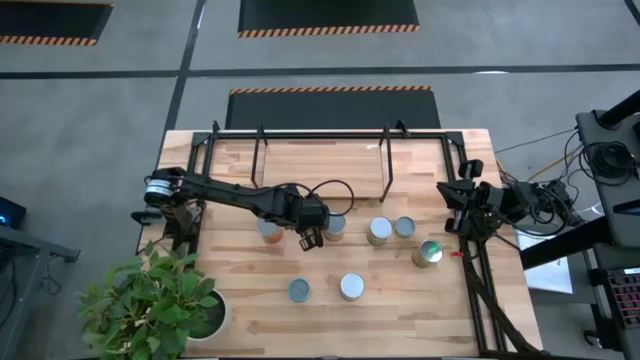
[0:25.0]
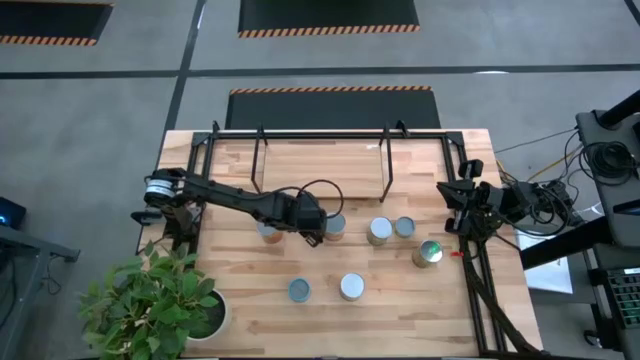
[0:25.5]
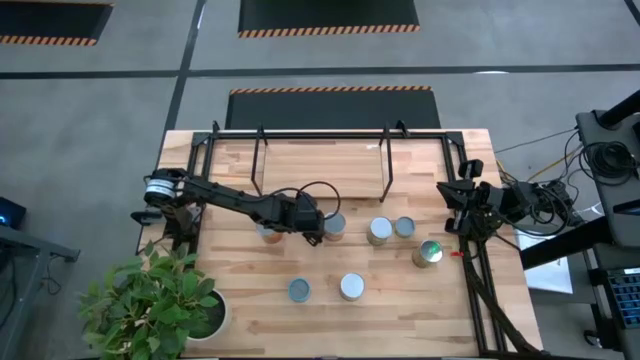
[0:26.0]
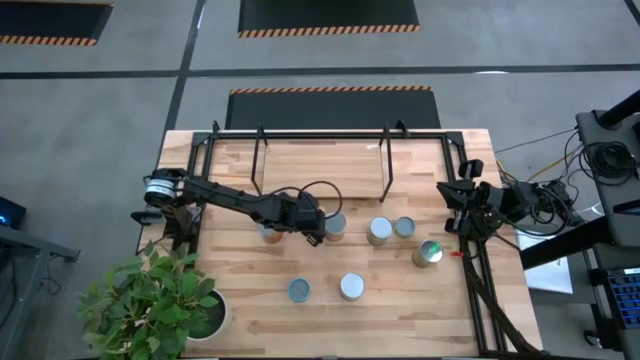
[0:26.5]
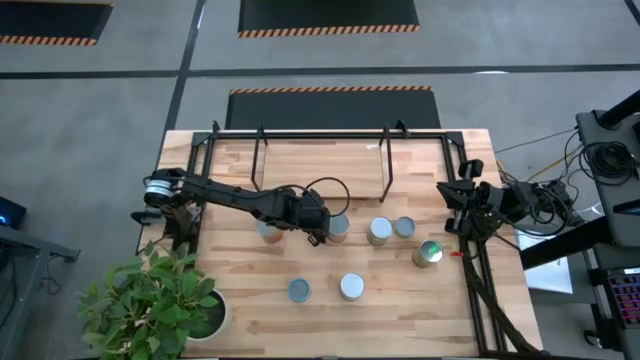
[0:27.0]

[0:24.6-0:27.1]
Task: Pick and place cans onto a shelf
Put the small yellow canned bean on the shelf

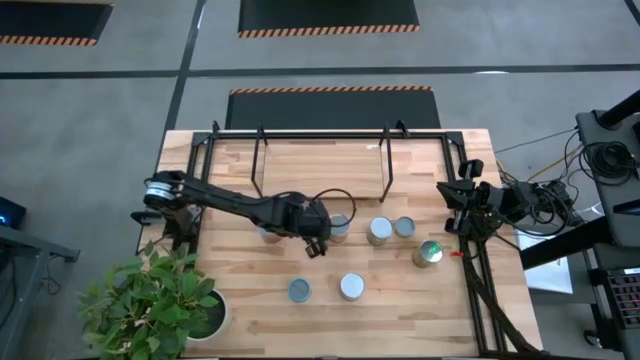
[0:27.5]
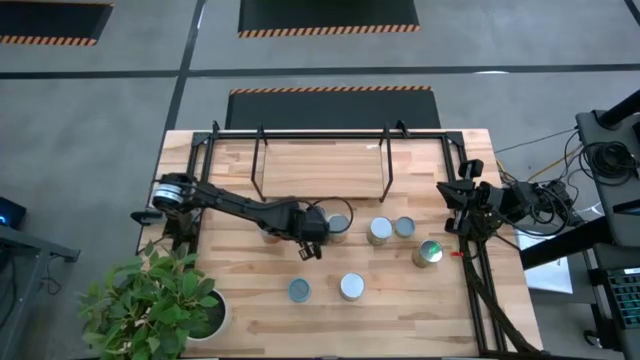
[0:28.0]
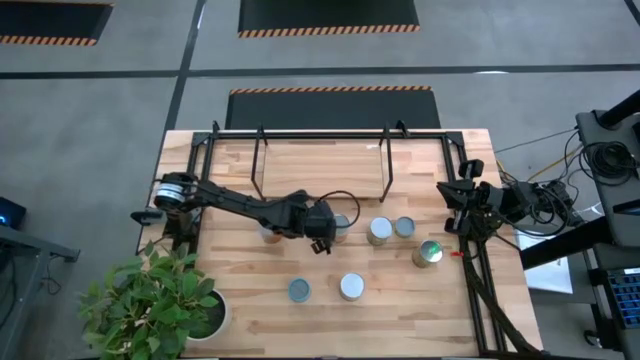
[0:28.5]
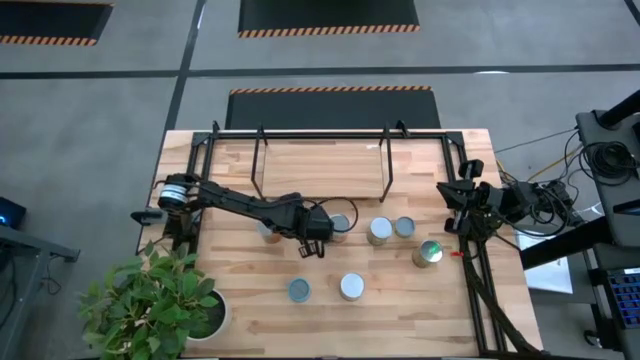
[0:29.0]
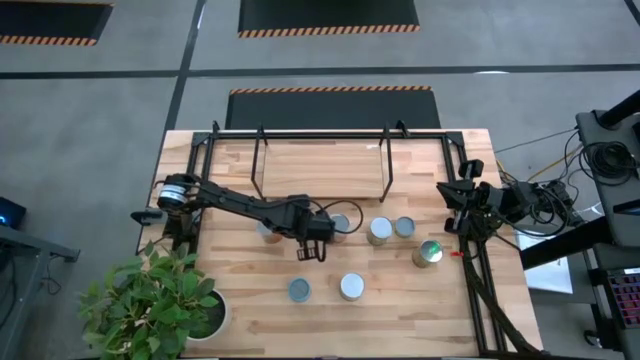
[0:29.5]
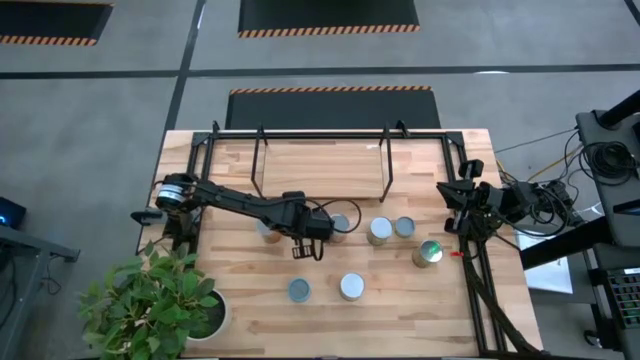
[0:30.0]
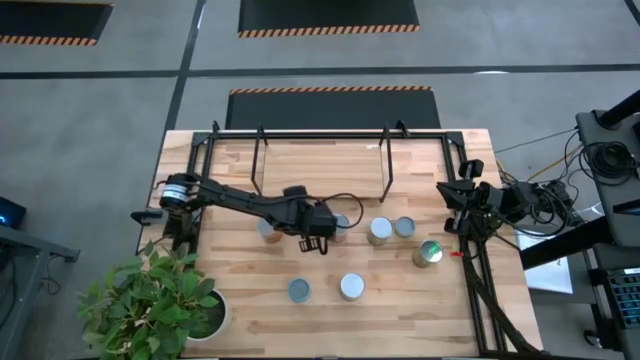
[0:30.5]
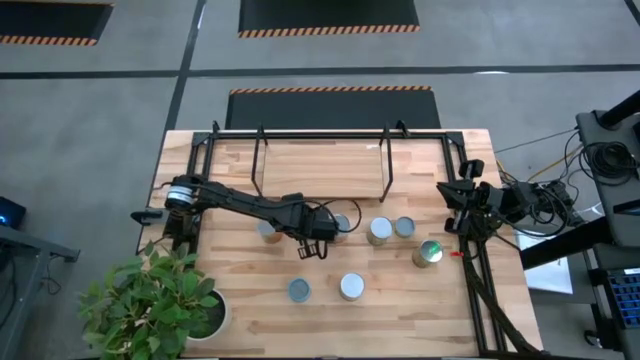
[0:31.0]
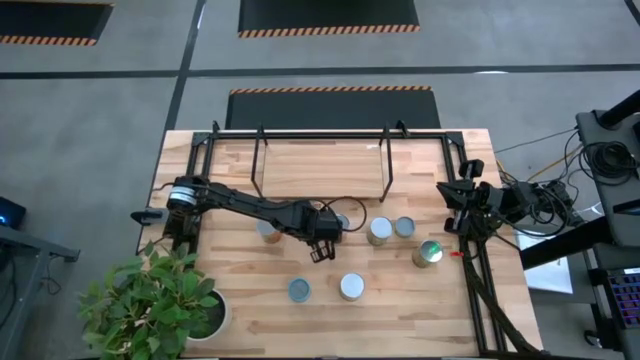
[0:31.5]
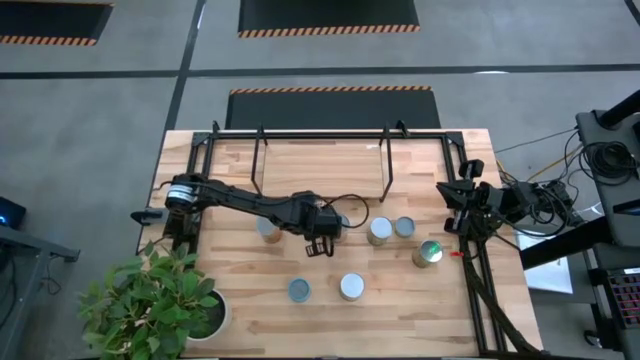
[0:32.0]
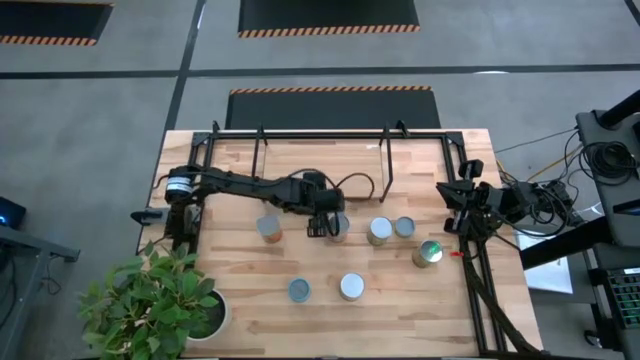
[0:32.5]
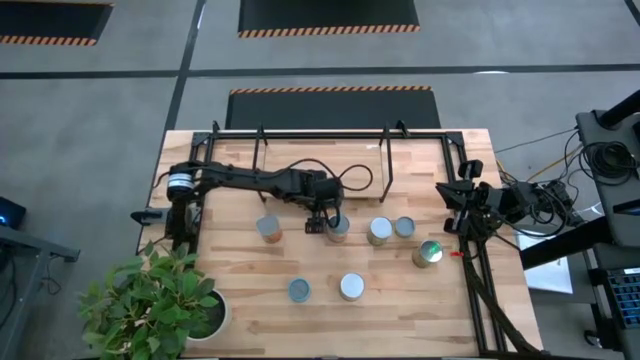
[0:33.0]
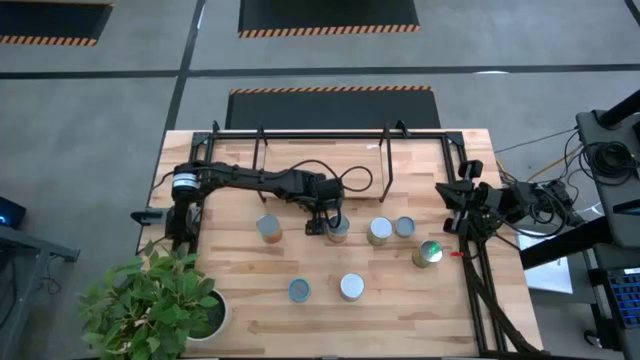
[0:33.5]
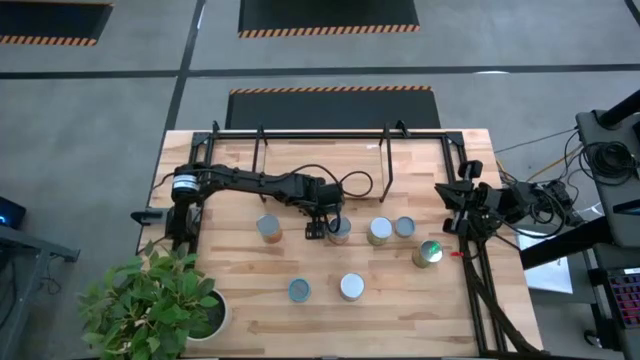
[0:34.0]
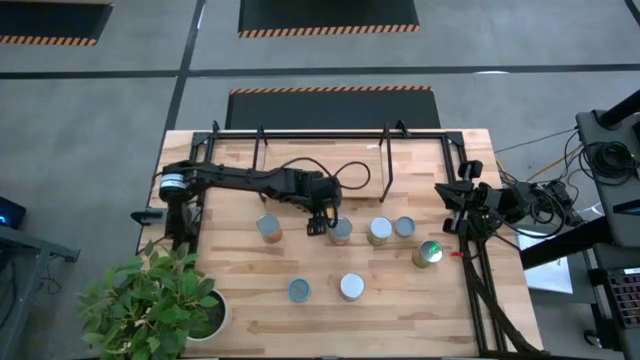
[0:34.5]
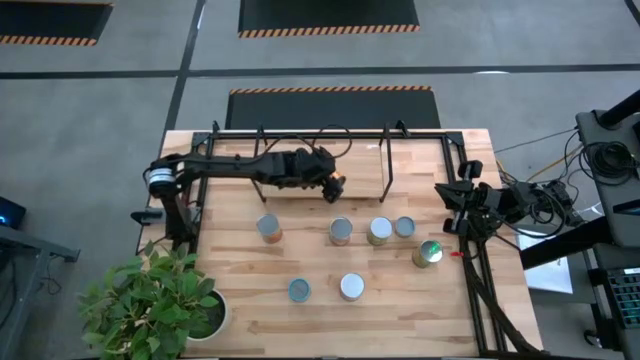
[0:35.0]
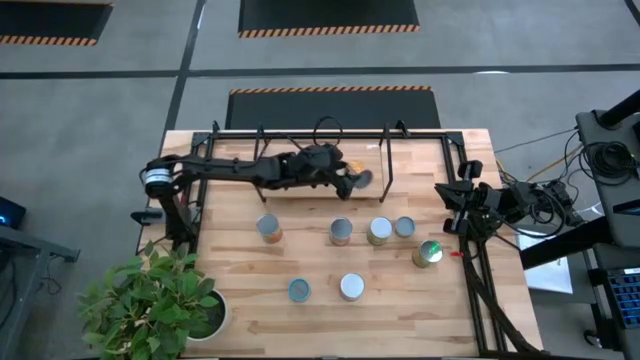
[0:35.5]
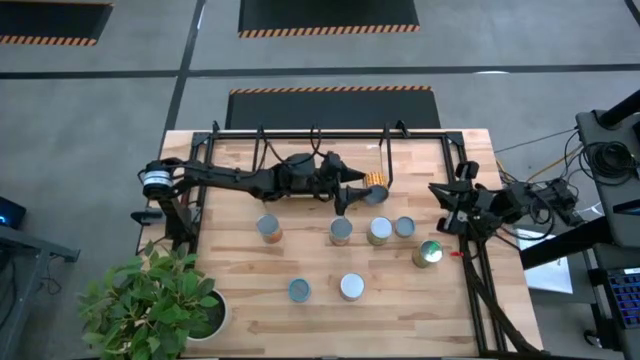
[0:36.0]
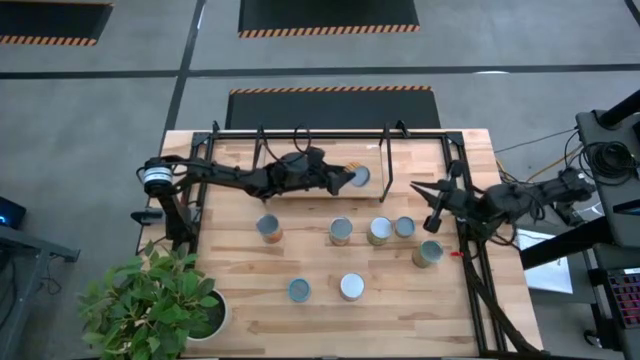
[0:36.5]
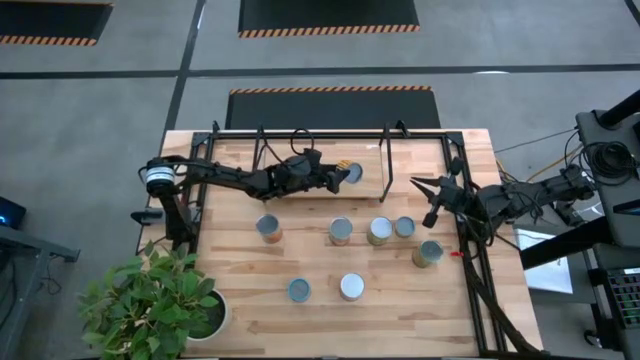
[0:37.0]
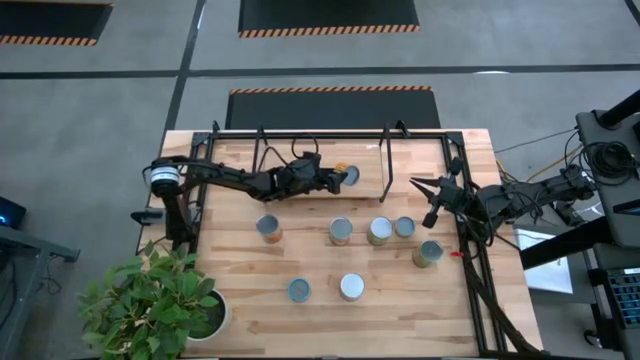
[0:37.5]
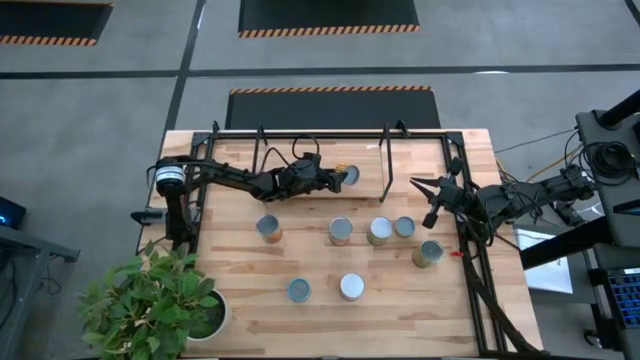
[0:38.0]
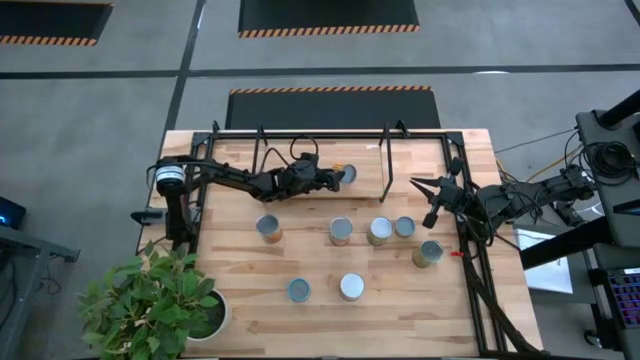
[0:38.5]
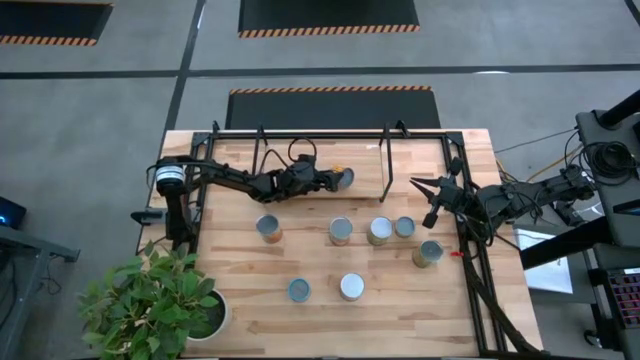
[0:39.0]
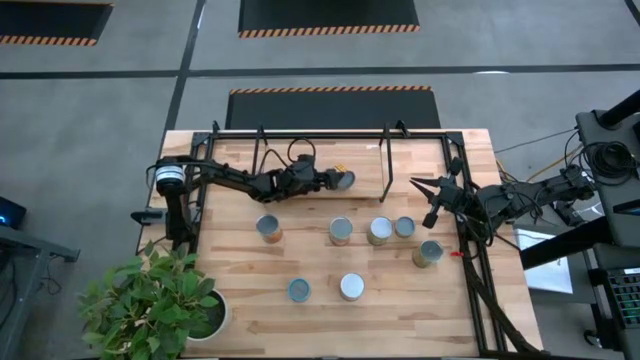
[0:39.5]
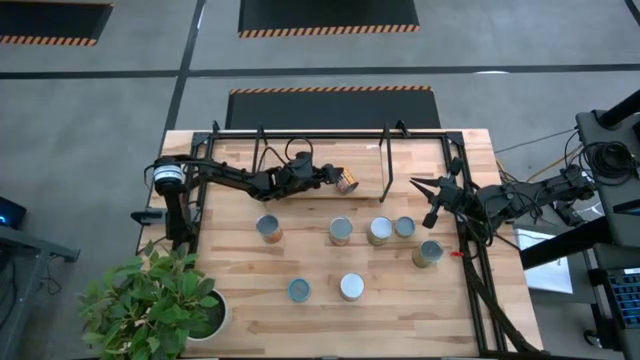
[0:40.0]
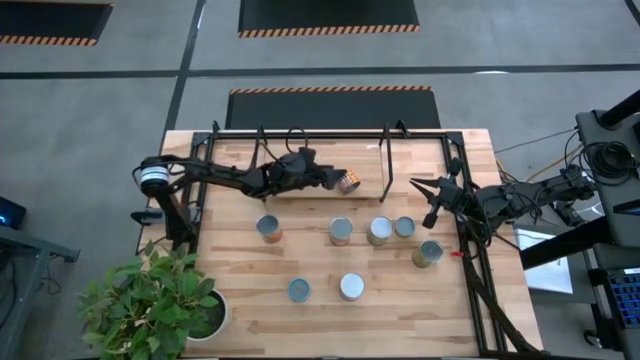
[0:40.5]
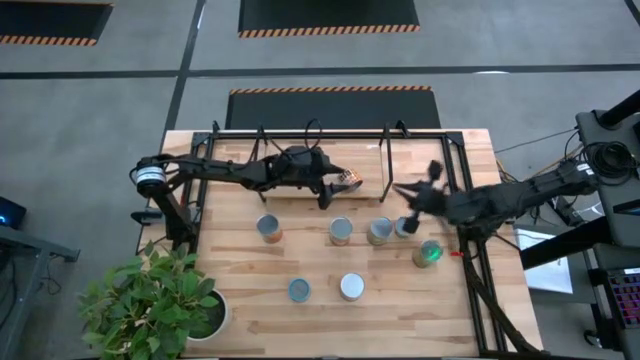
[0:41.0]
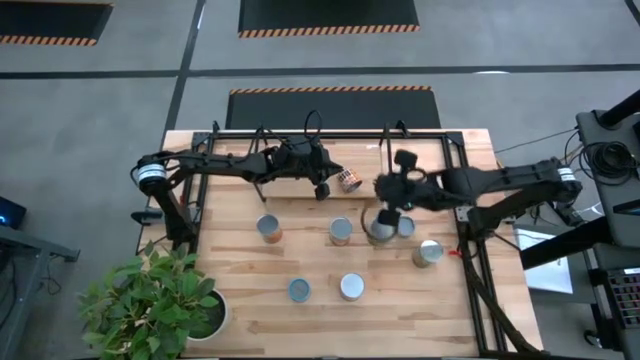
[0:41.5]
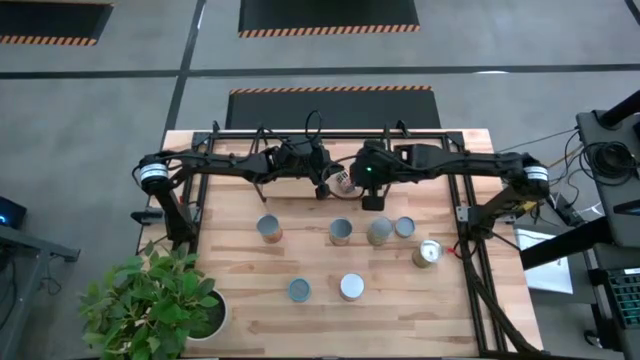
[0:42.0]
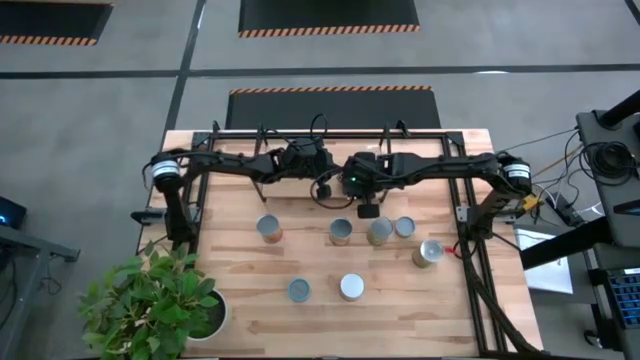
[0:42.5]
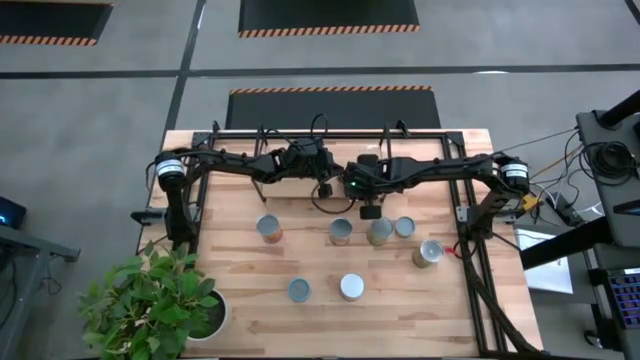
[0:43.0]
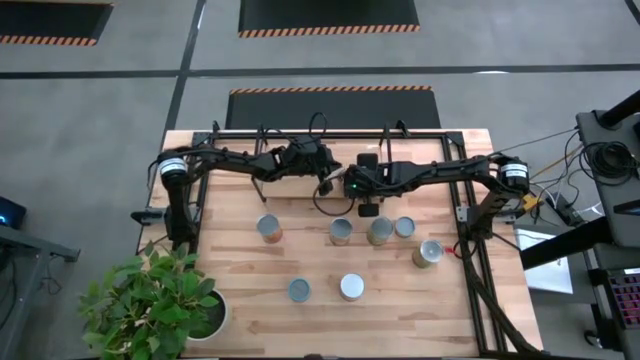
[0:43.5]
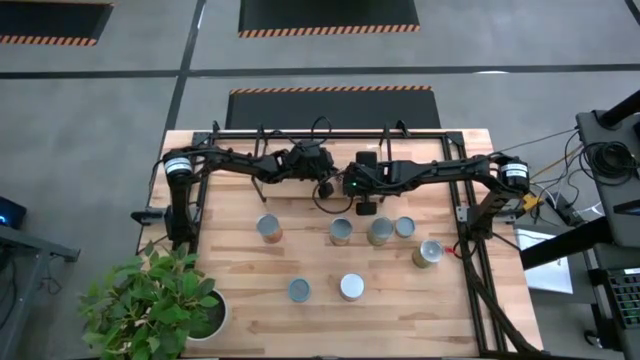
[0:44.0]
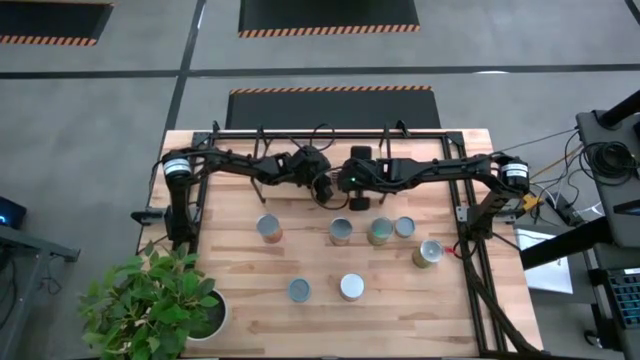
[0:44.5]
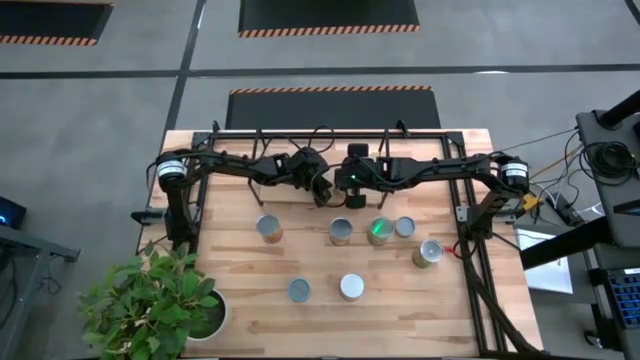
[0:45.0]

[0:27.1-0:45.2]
Put the small yellow canned bean on the shelf

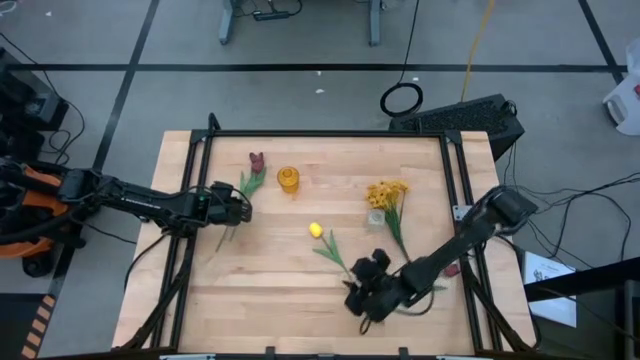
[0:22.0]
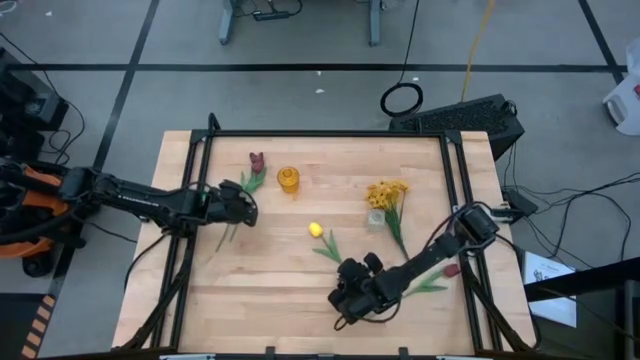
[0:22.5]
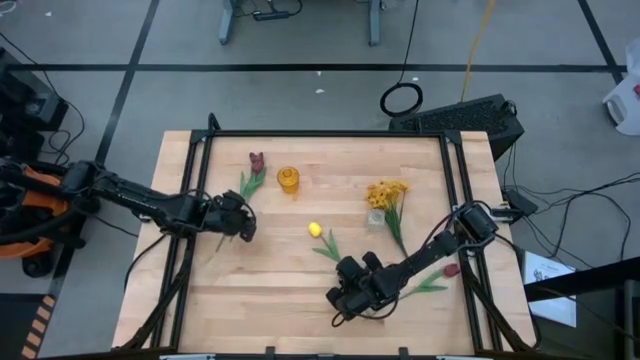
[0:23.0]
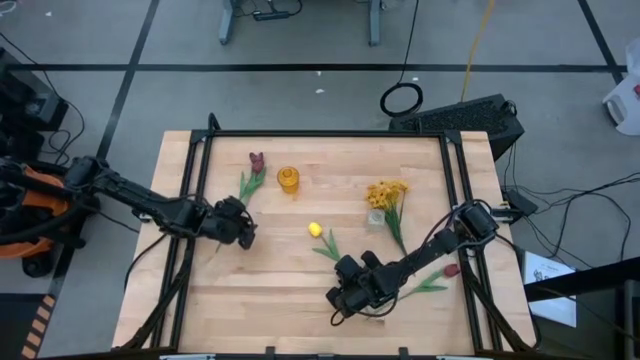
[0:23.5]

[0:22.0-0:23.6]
Task: Sort flowers into vase by color
Move the yellow flower on top of the other yellow flower
